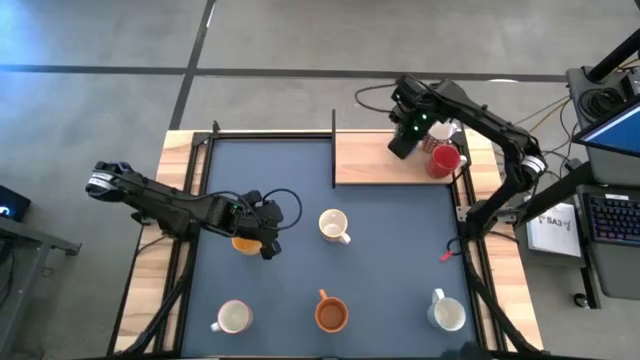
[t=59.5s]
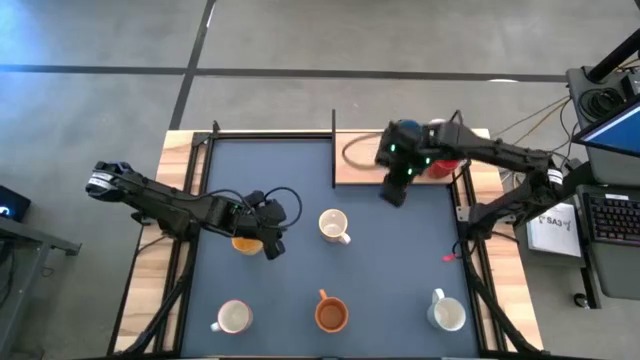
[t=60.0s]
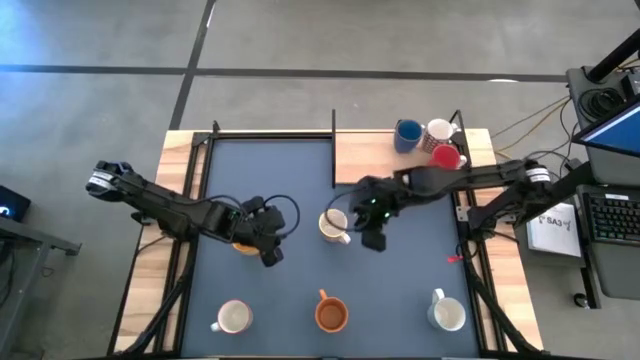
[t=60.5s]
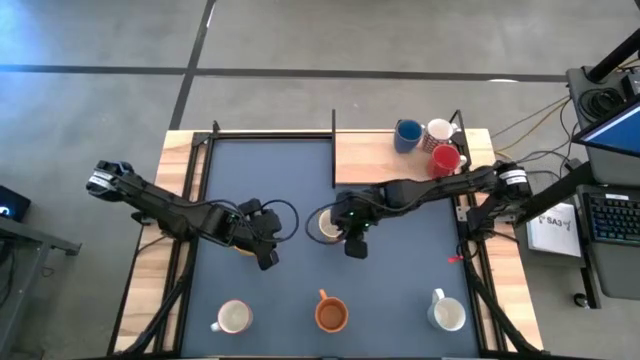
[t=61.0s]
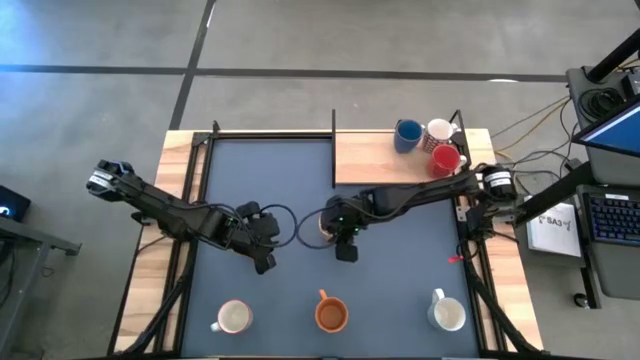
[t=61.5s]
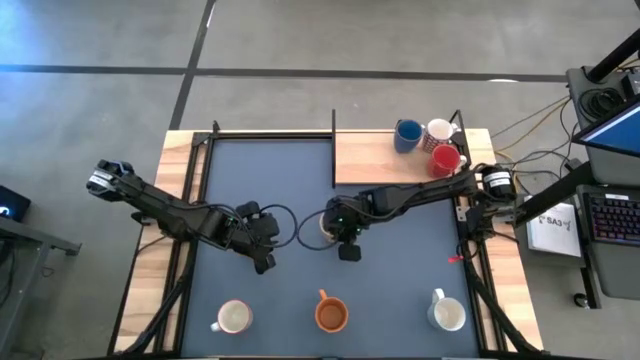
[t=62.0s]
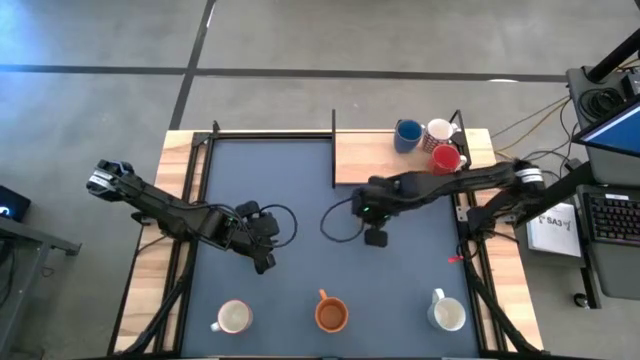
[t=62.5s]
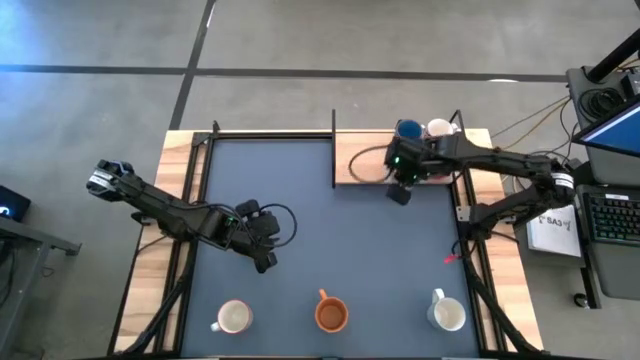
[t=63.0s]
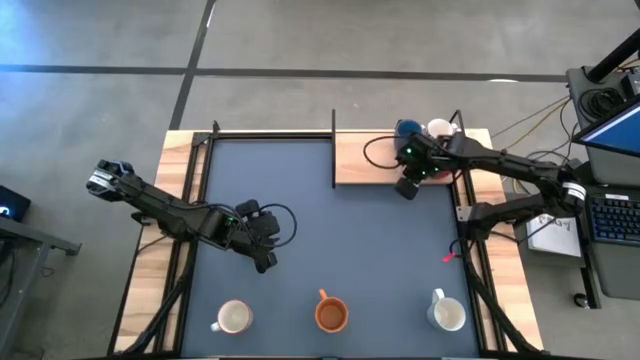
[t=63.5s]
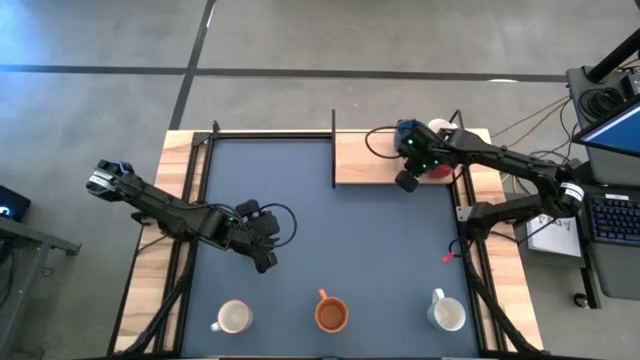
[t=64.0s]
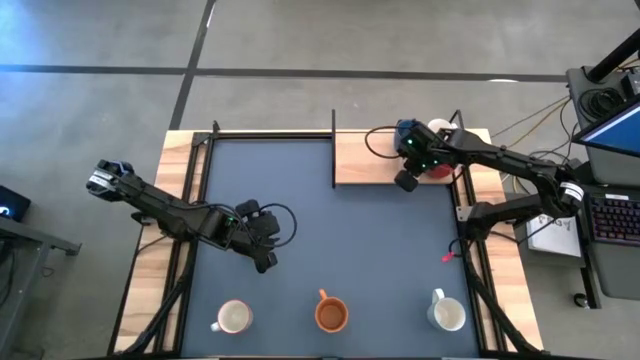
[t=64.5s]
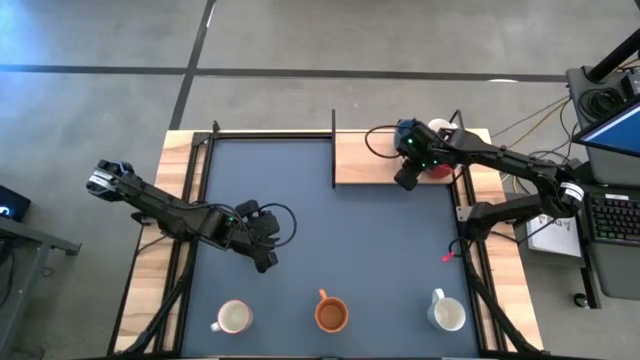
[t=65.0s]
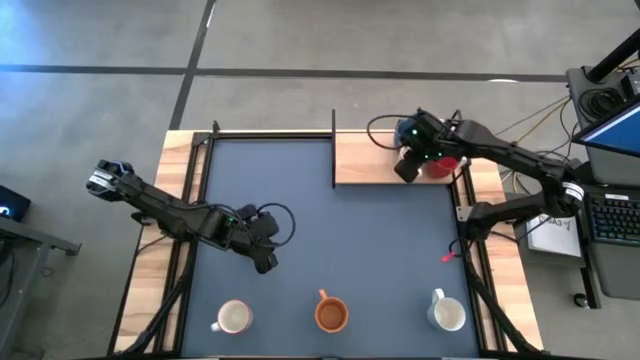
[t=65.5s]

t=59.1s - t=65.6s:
Task: Place coffee mugs
Put the orange patterned mug on the shelf

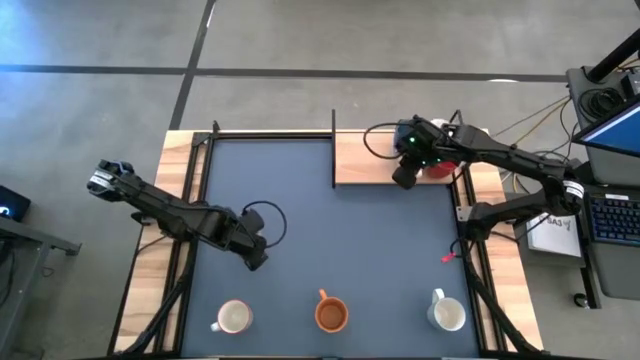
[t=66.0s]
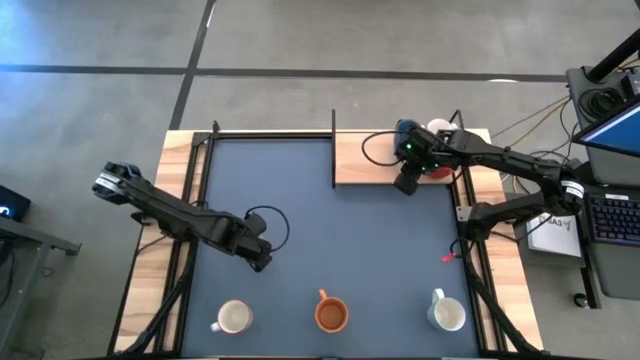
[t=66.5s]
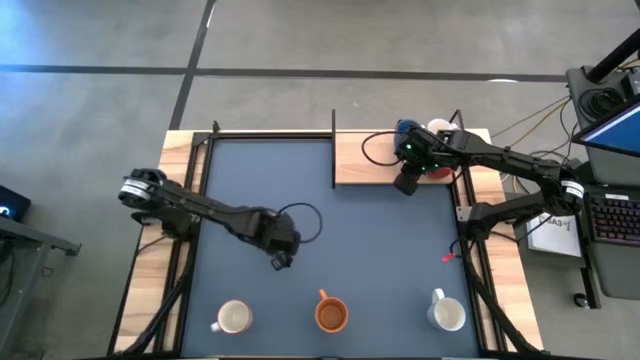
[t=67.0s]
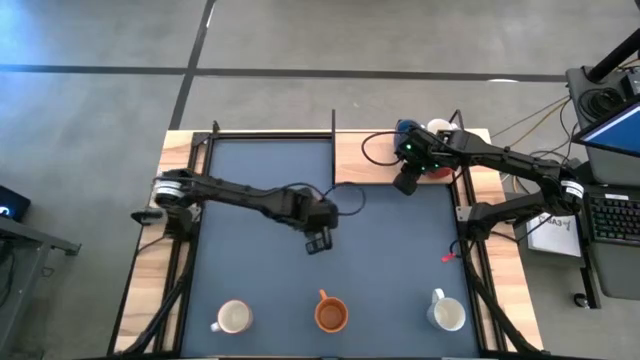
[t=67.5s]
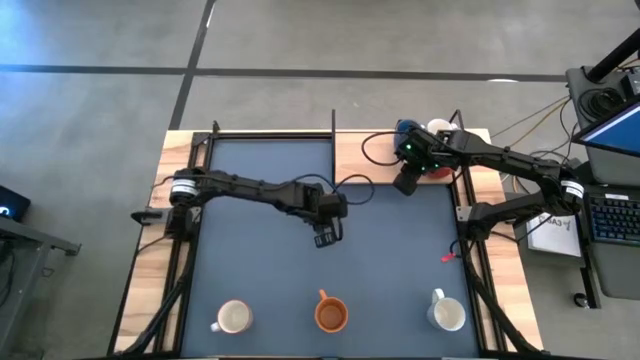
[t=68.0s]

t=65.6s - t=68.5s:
Move the yellow mug to the middle of the table

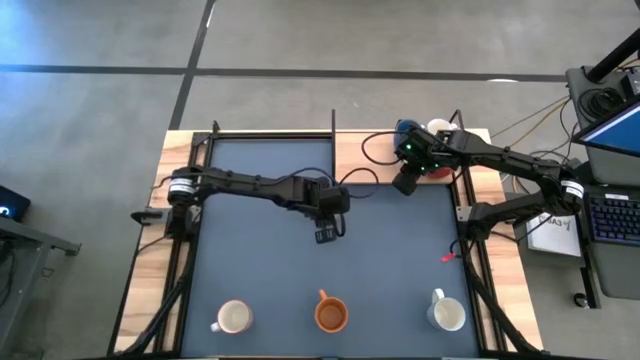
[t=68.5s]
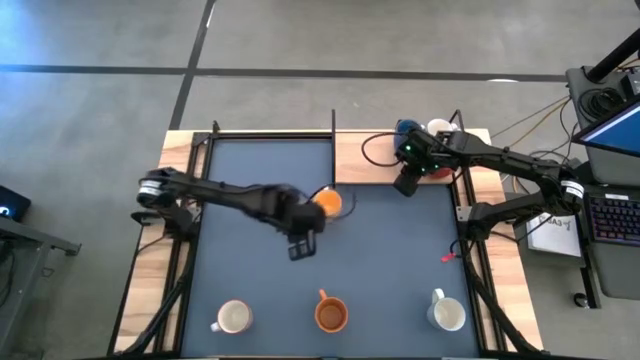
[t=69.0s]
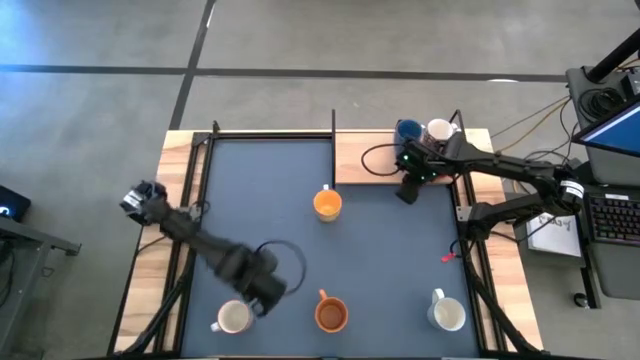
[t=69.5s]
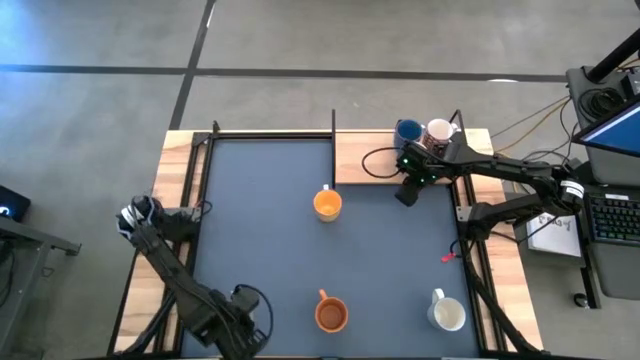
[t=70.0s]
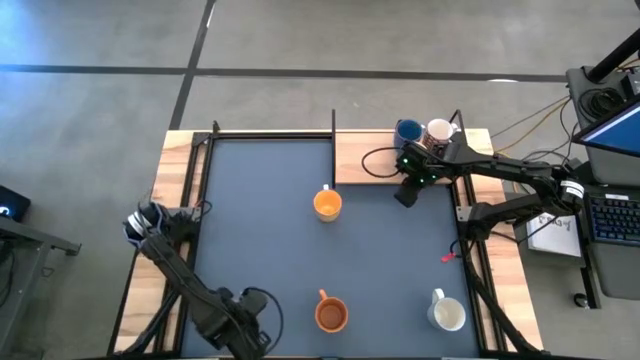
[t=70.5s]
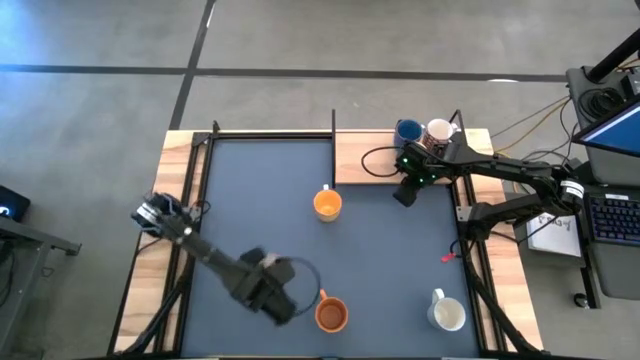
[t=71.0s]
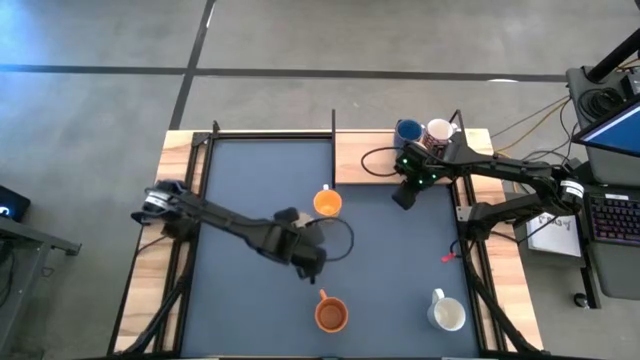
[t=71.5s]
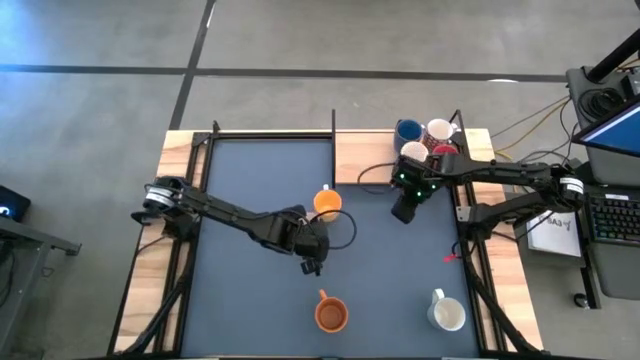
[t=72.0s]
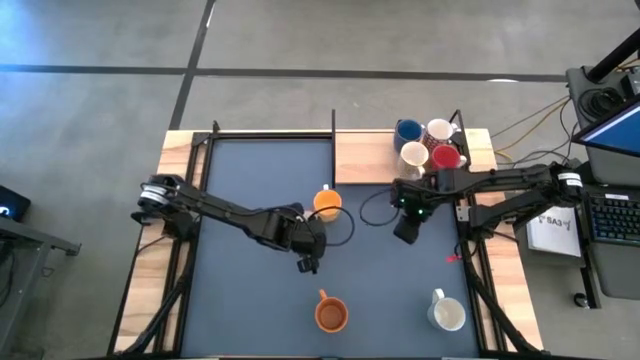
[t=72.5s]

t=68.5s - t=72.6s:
Move the gray patterned mug to the middle of the table

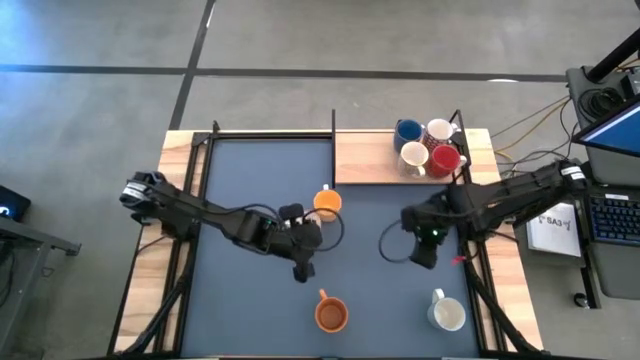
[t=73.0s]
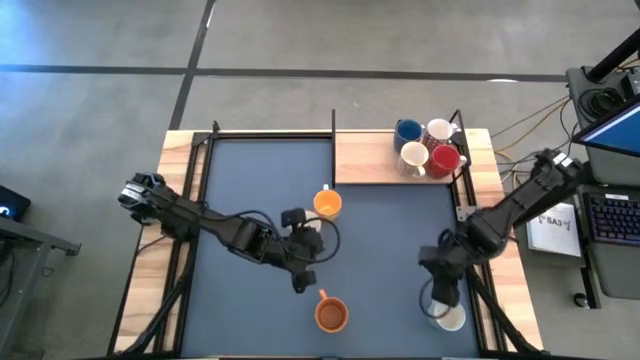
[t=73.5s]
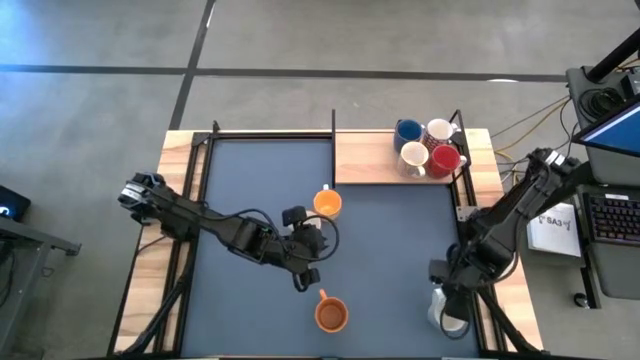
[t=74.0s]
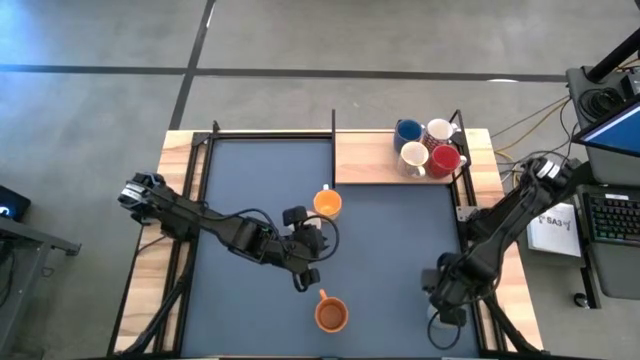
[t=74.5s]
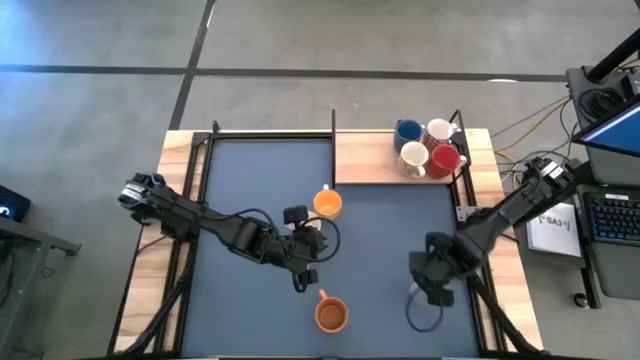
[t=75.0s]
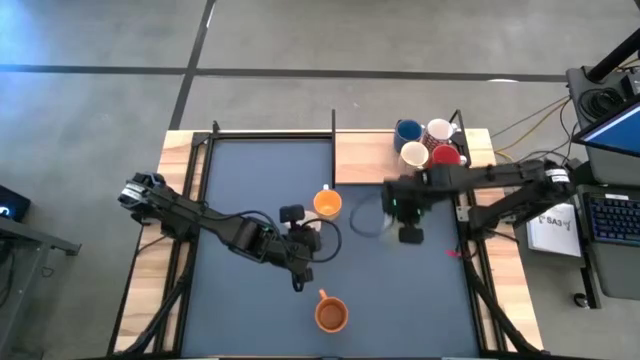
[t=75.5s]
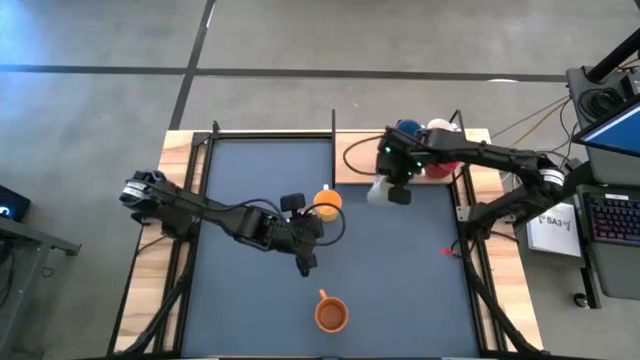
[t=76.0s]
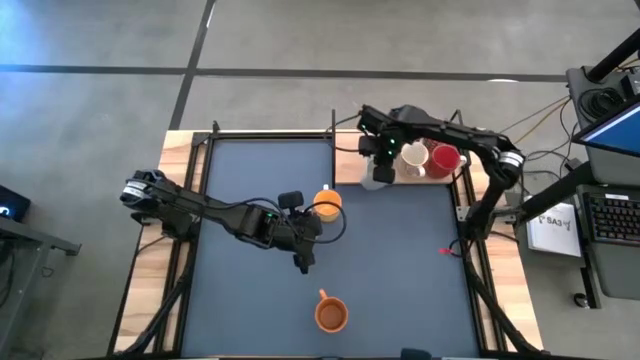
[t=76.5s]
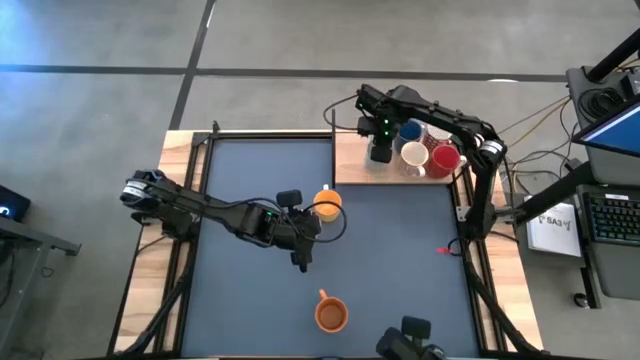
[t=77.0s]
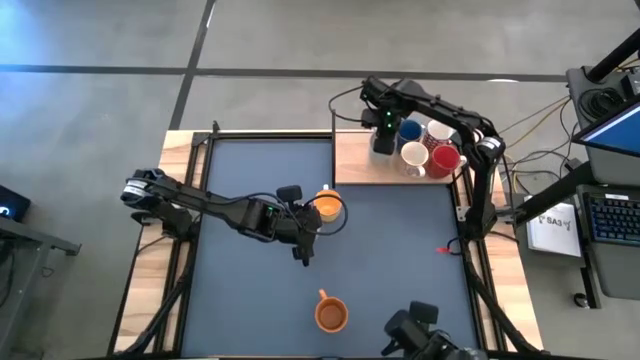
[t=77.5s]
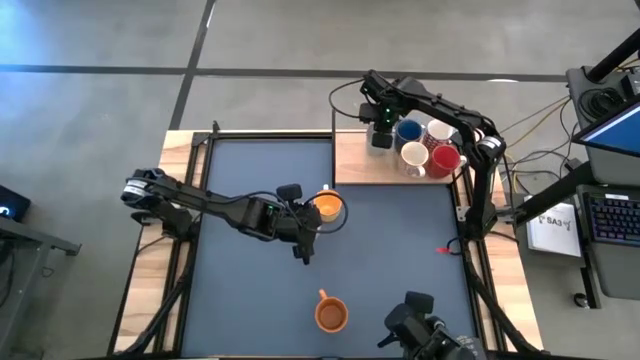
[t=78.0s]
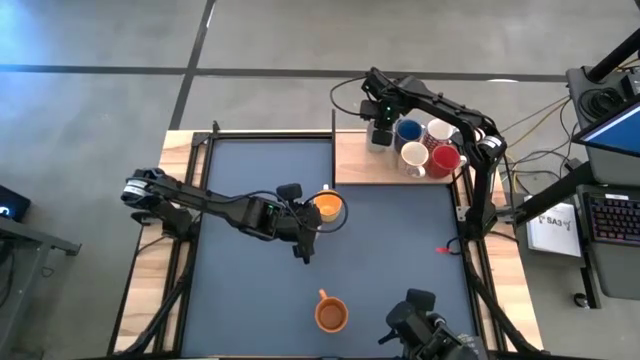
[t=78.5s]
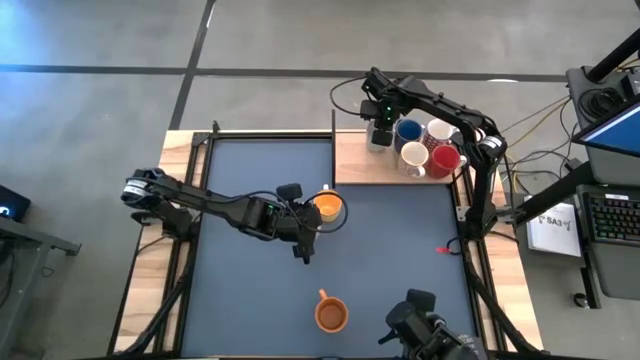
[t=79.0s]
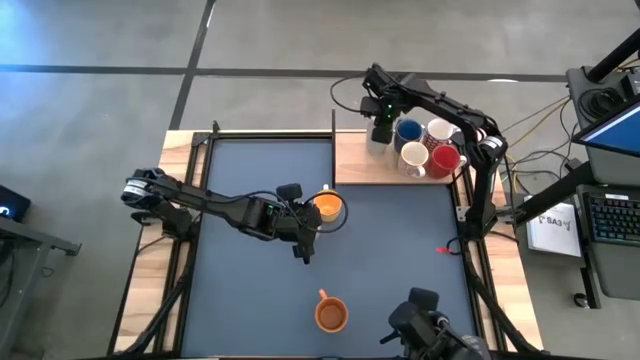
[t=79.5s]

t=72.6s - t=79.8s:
Put the green patterned mug on the shelf
